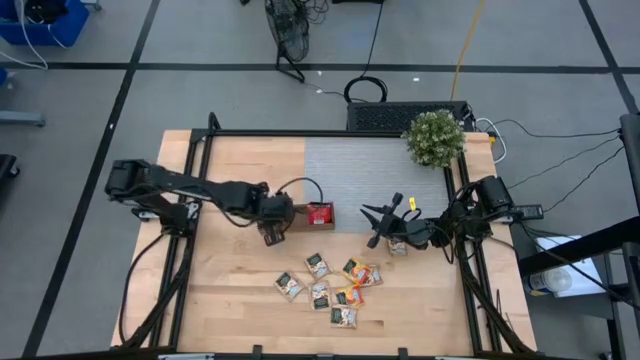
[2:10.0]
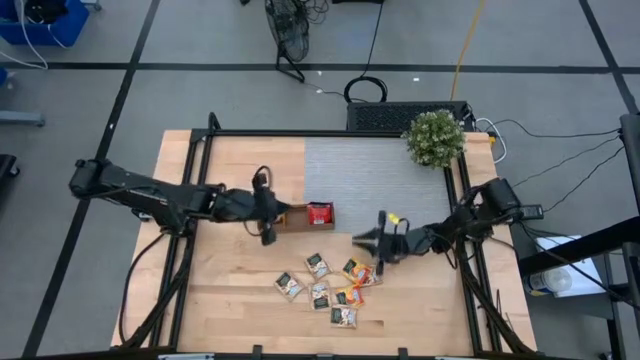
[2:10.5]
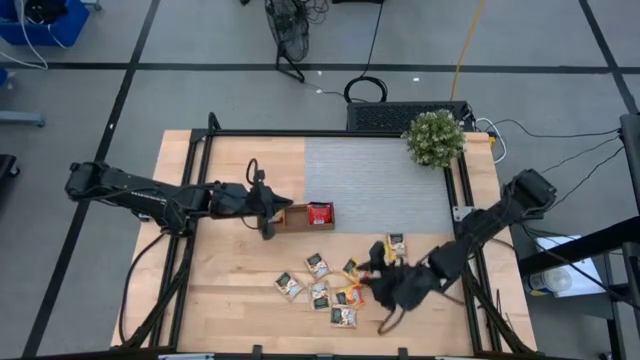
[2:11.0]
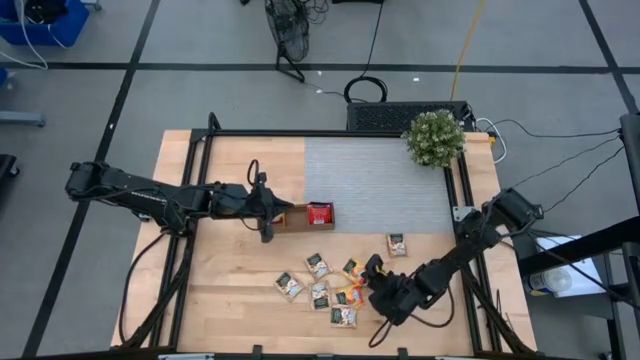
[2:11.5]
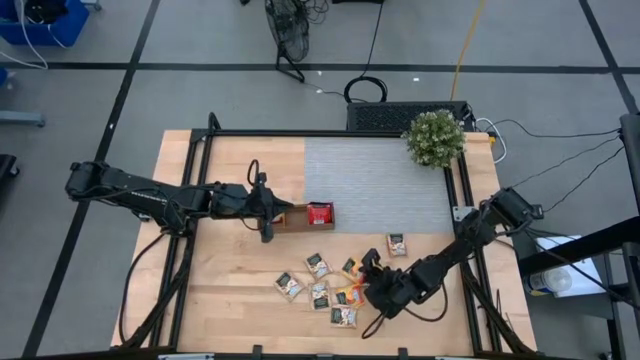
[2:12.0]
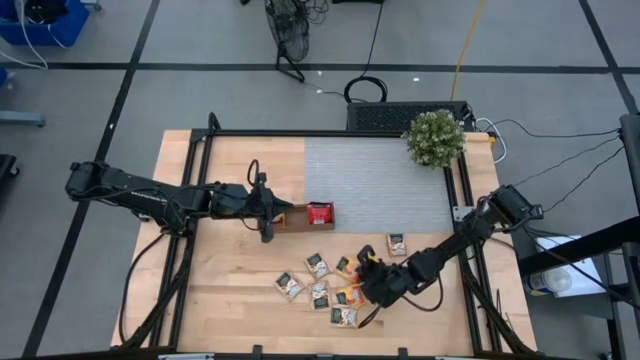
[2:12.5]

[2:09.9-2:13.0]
Task: Pick & Place Tea
Put the yellow tea bag into the left section of the wooden organizer

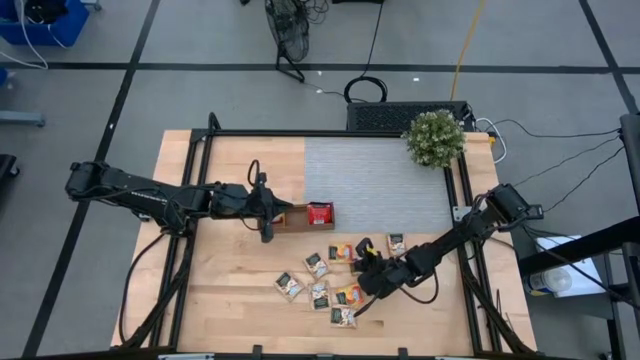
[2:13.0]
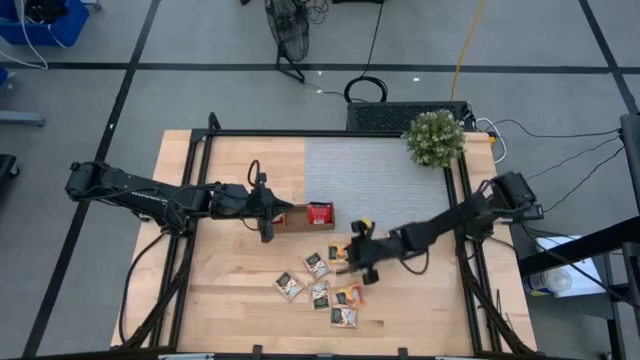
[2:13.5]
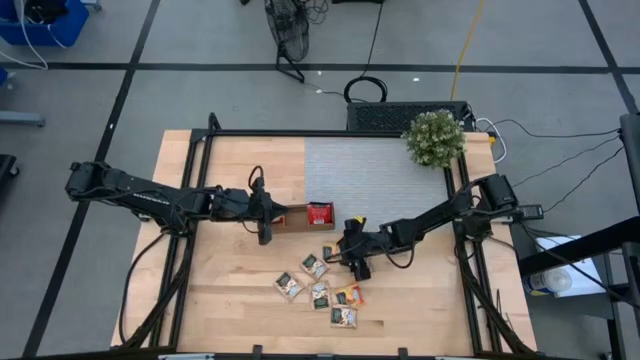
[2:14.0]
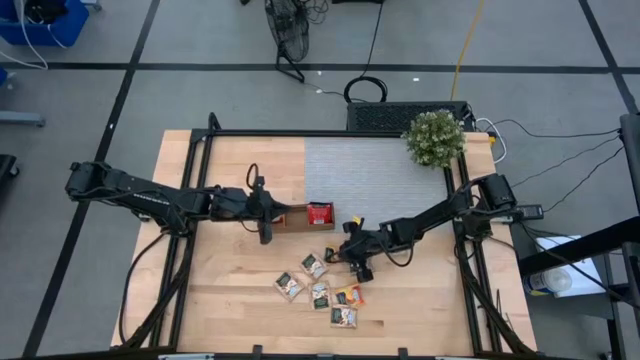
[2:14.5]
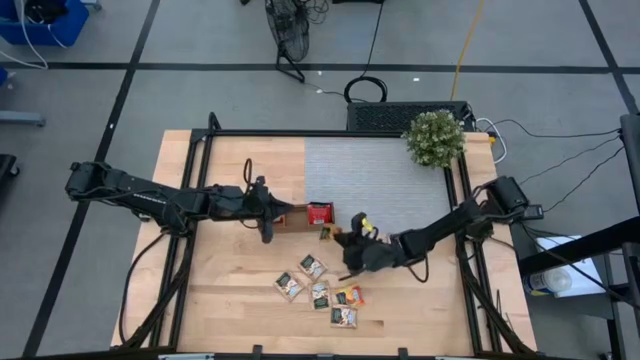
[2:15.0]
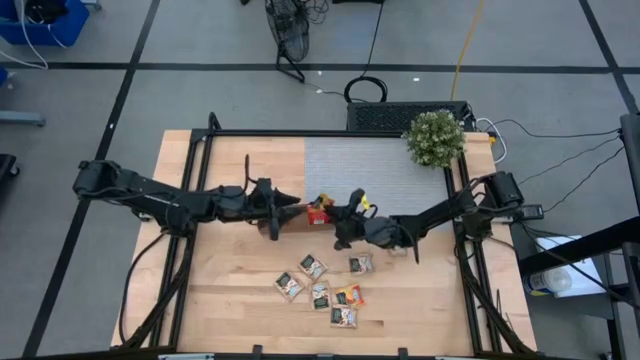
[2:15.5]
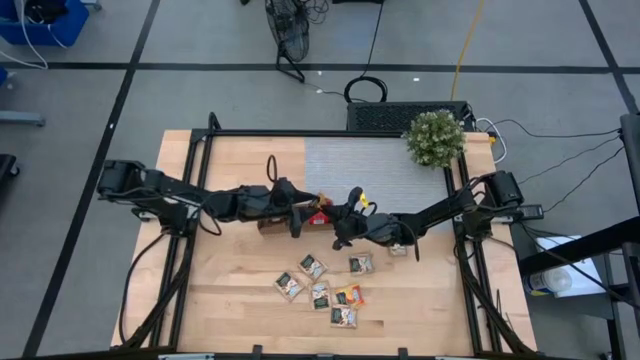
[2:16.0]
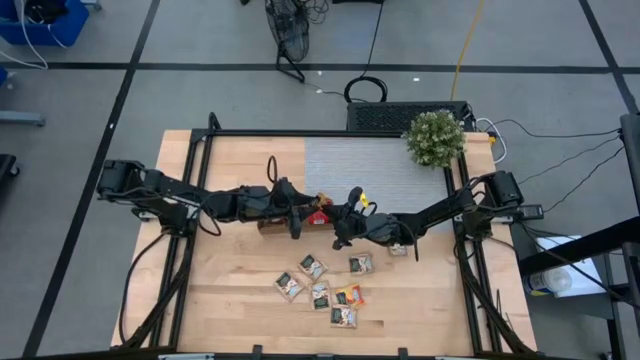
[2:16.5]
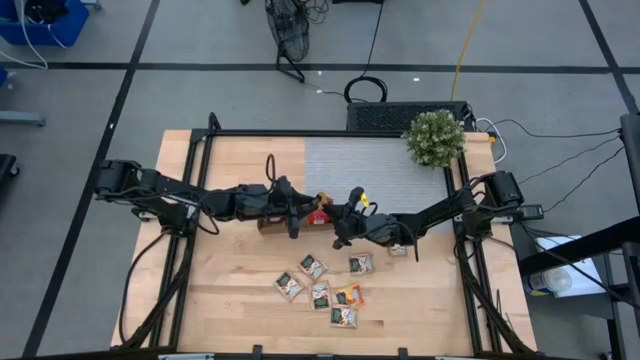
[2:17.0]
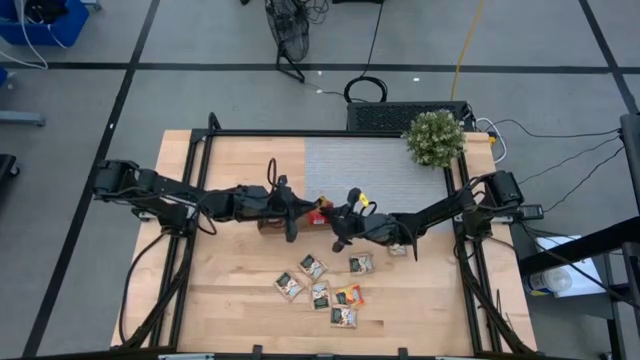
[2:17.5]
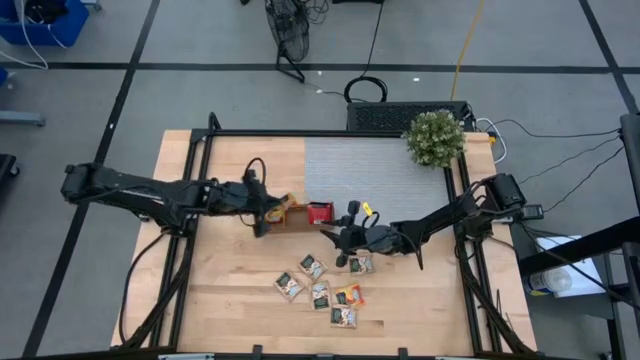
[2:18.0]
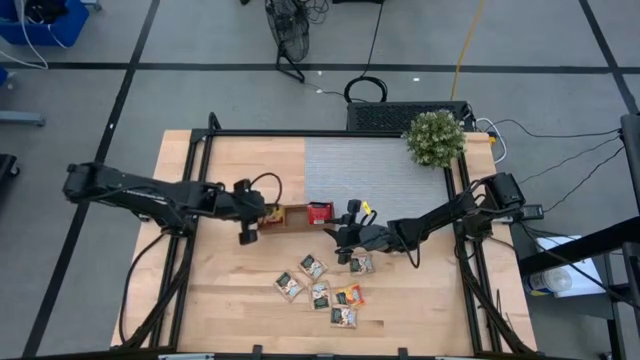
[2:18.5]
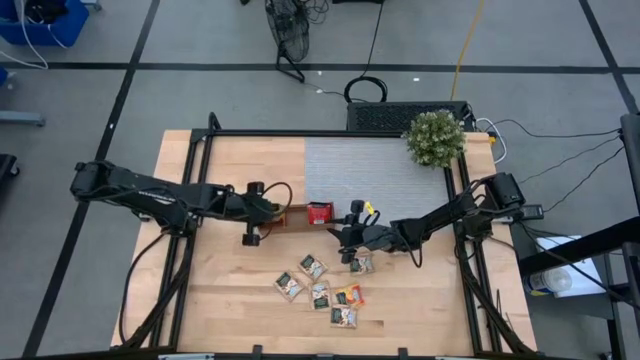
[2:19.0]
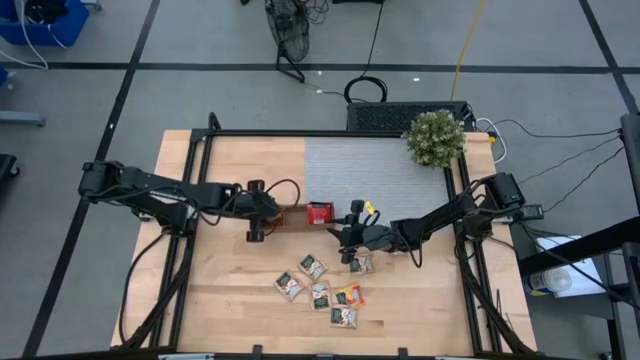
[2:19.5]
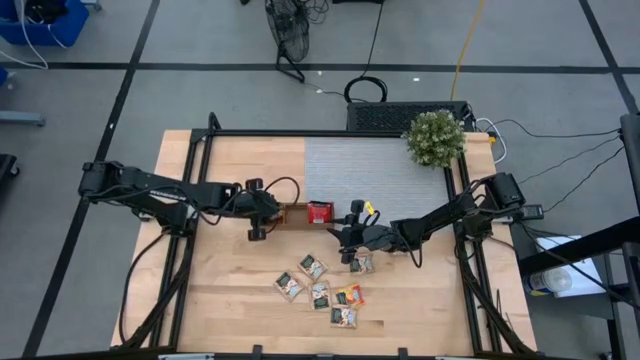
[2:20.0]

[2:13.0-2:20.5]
Put the yellow tea bag into the left section of the wooden organizer

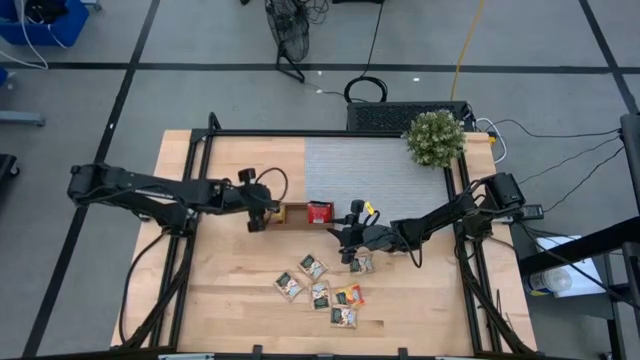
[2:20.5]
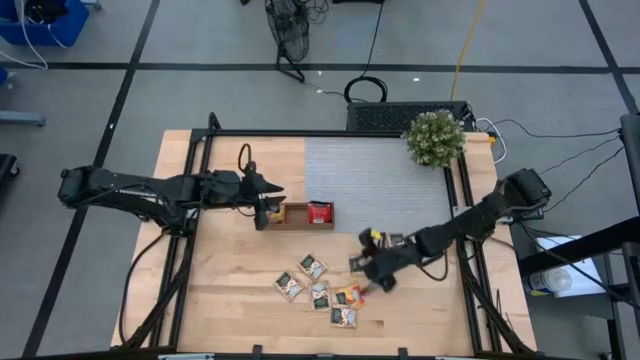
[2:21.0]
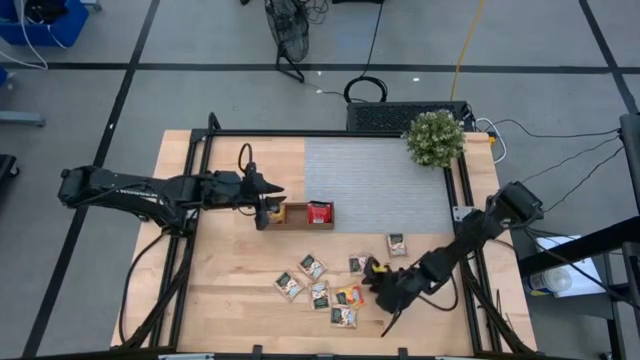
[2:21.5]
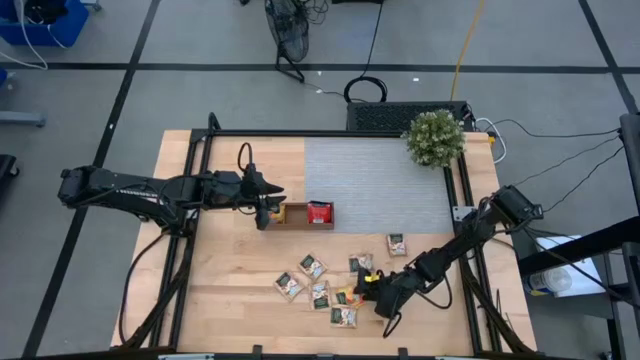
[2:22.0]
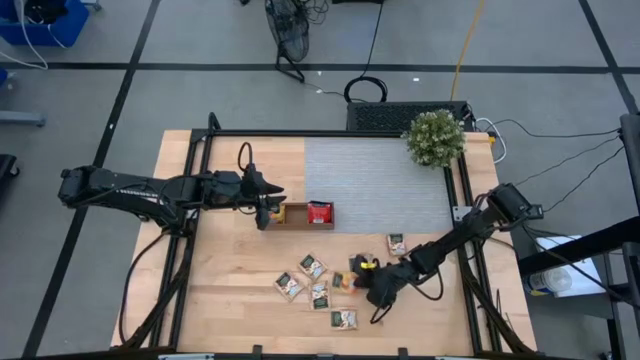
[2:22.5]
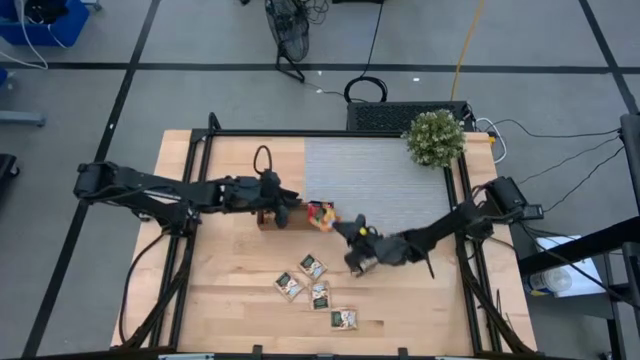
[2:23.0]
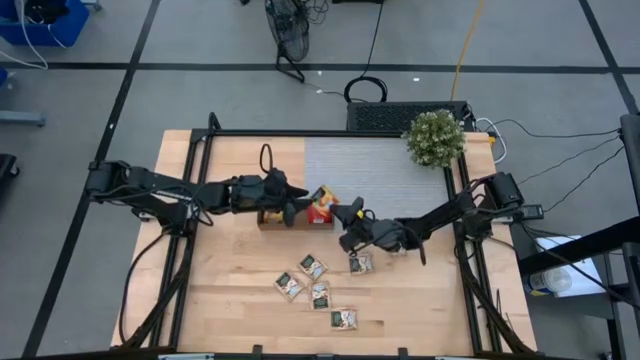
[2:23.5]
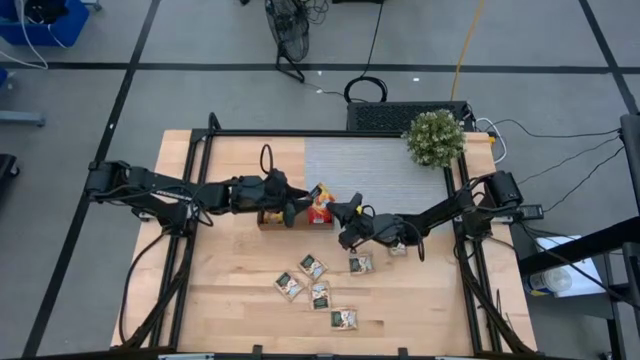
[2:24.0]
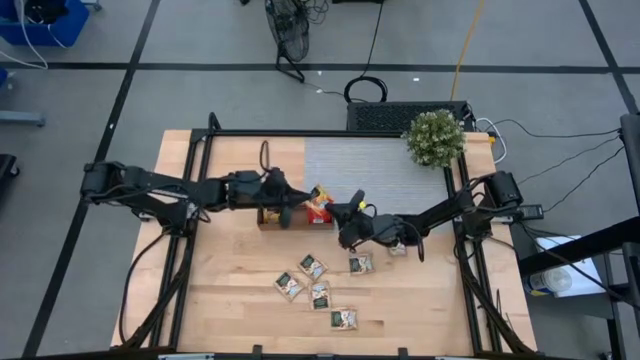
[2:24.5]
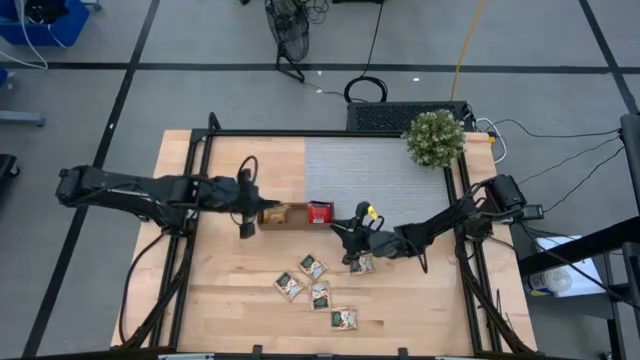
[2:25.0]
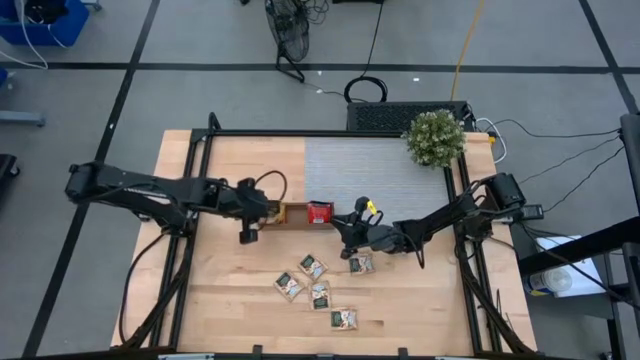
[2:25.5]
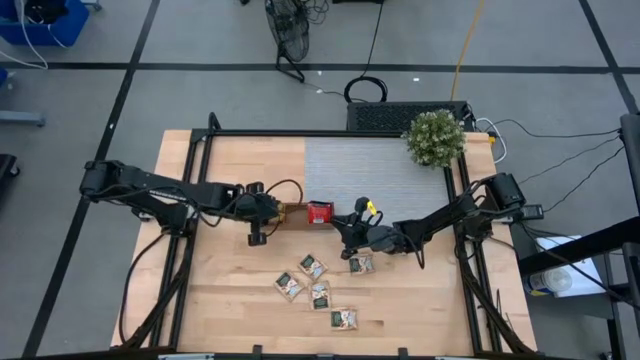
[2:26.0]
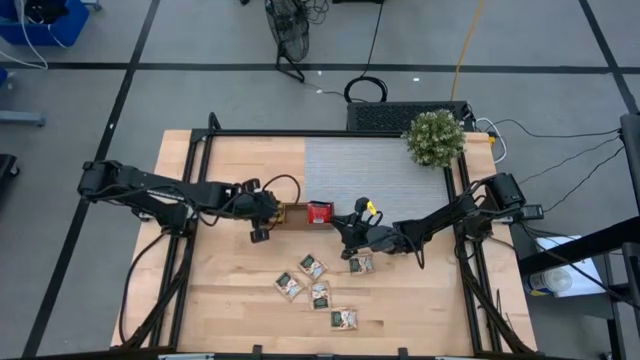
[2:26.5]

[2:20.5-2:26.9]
Put the yellow tea bag into the left section of the wooden organizer

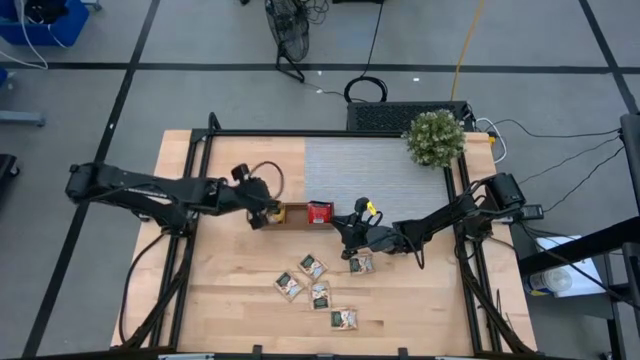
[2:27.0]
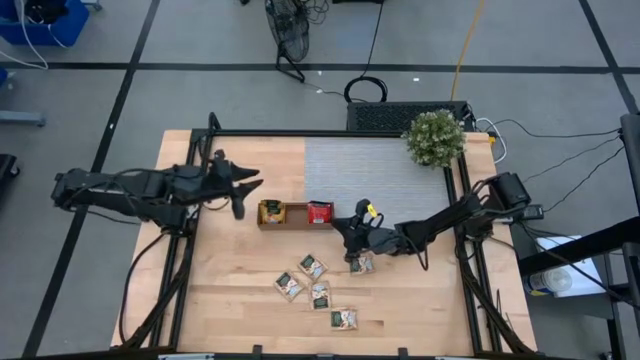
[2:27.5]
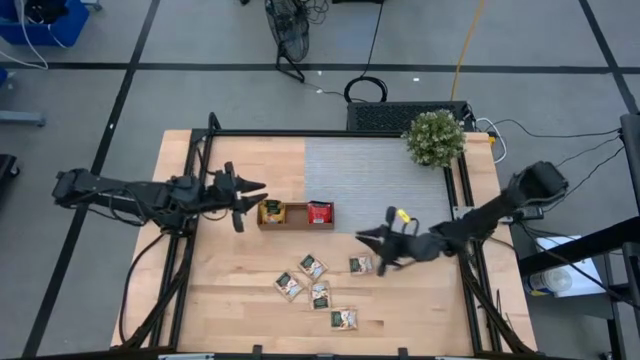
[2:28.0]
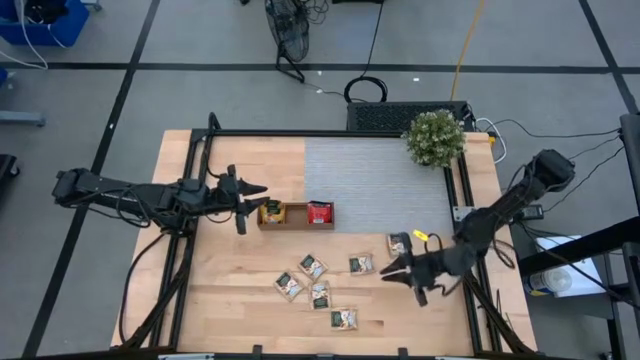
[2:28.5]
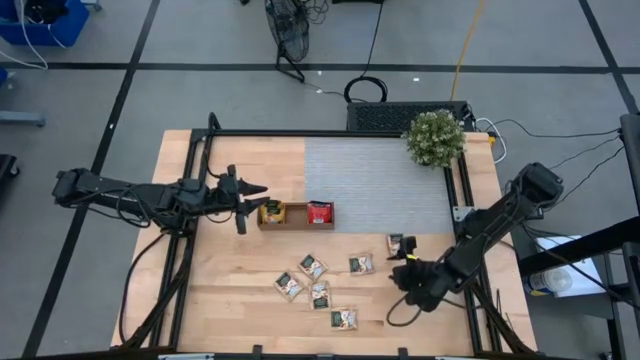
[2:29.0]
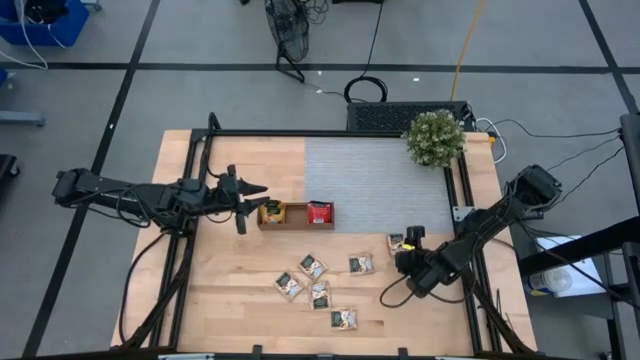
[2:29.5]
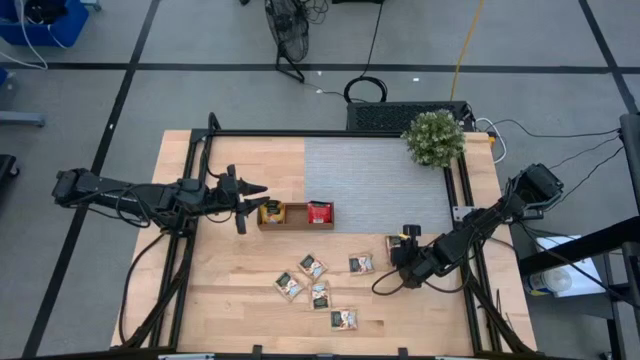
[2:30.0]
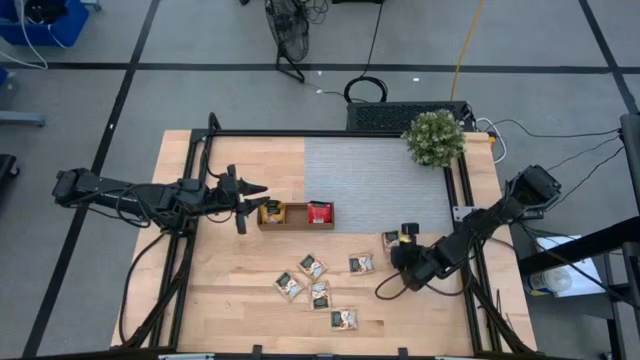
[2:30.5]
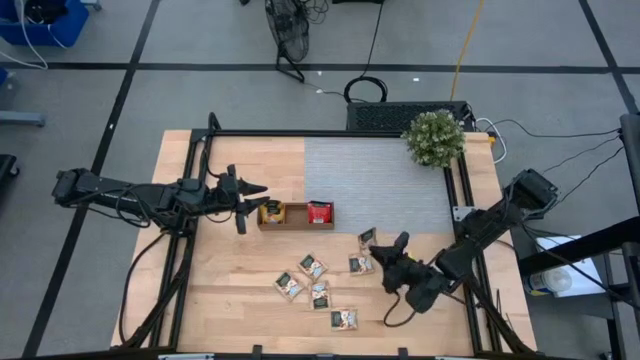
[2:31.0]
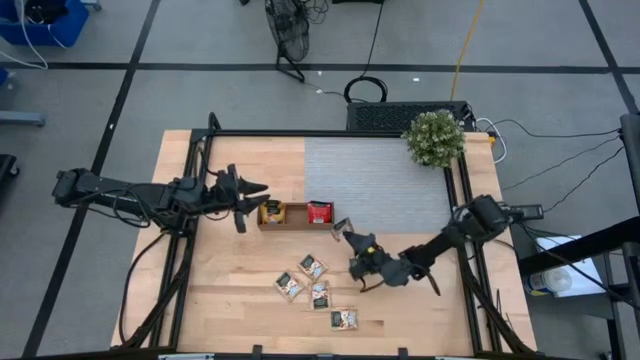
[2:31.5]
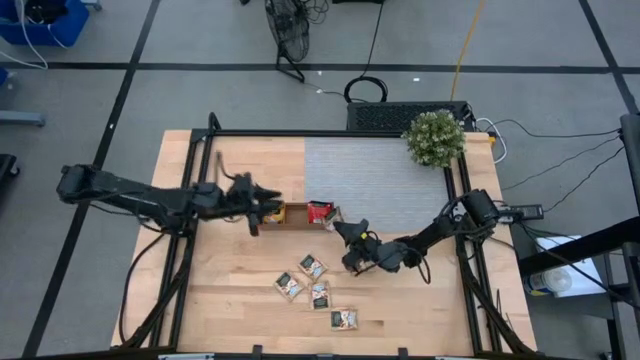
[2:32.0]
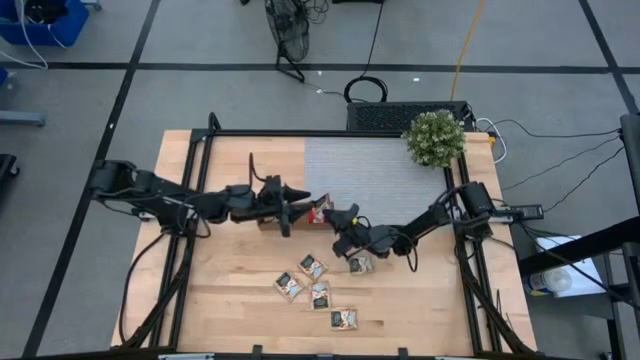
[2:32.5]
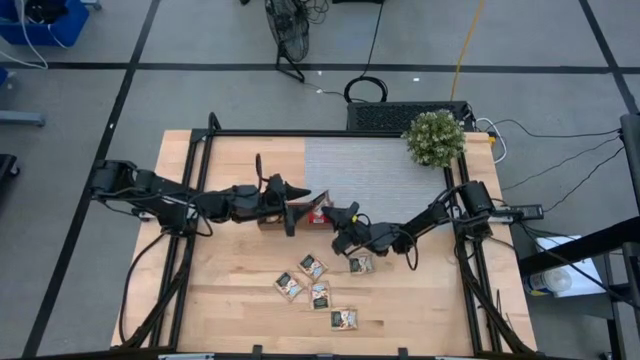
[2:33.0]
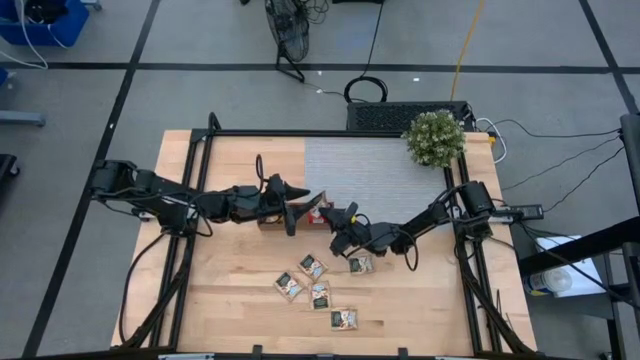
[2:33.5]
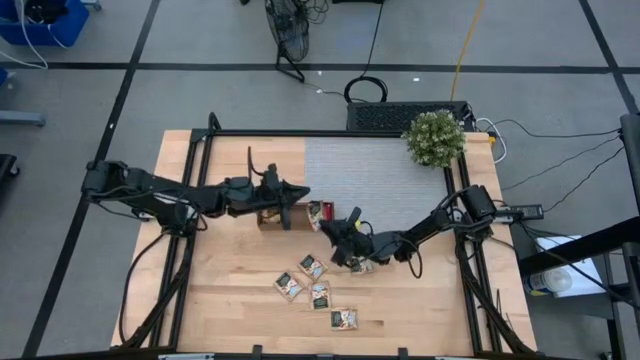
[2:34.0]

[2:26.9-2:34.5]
Put the brown tea bag into the middle section of the wooden organizer
